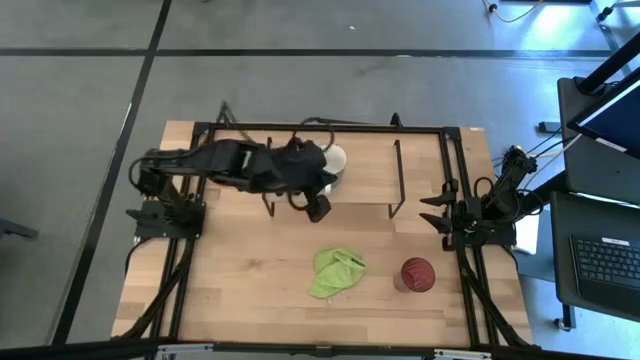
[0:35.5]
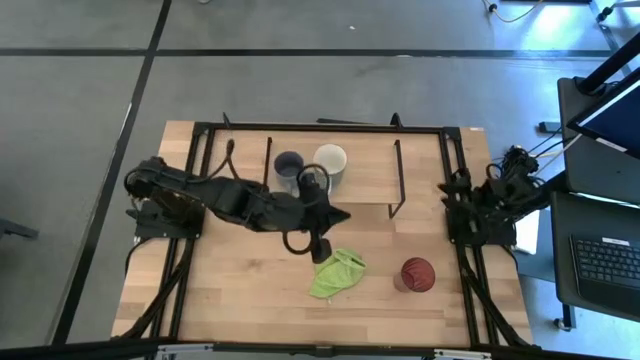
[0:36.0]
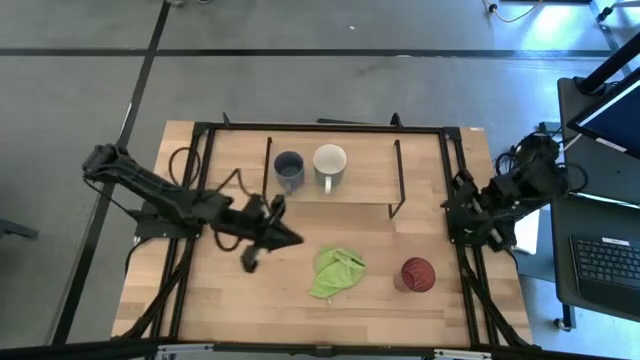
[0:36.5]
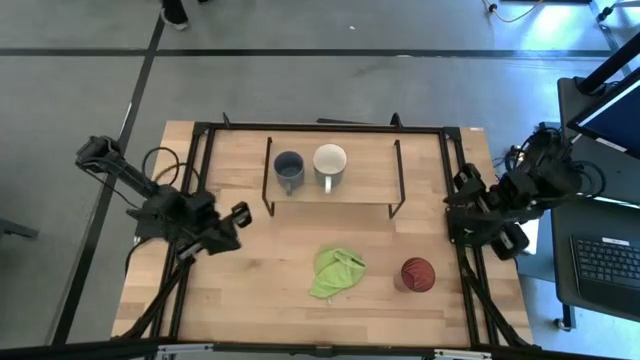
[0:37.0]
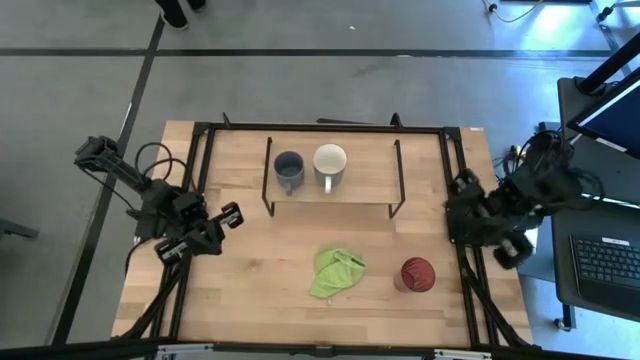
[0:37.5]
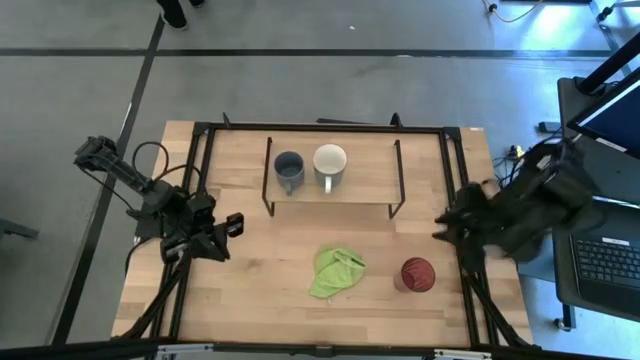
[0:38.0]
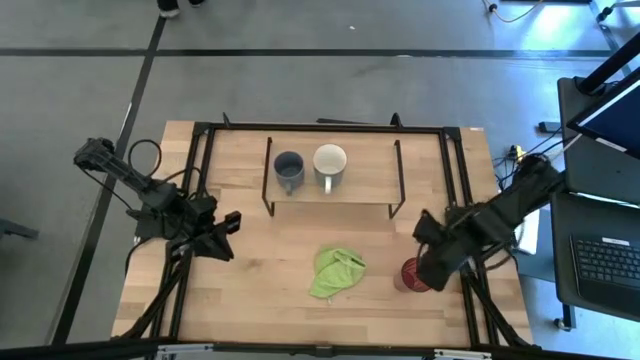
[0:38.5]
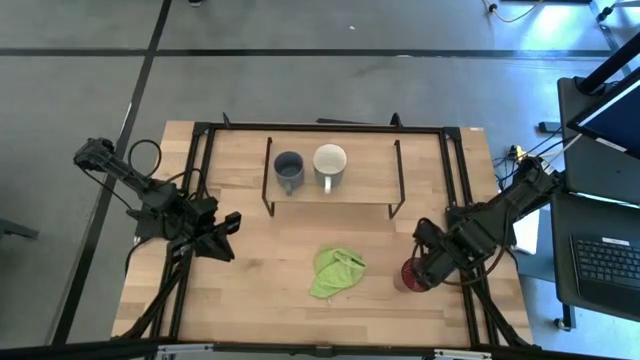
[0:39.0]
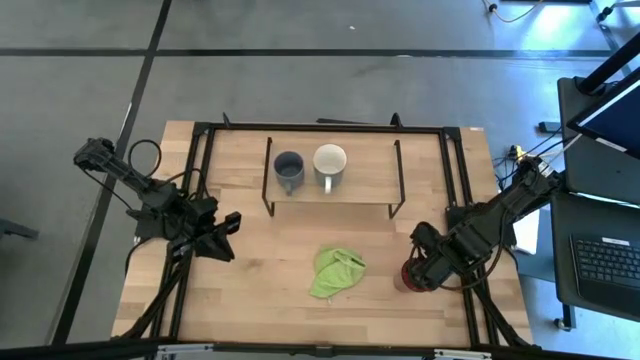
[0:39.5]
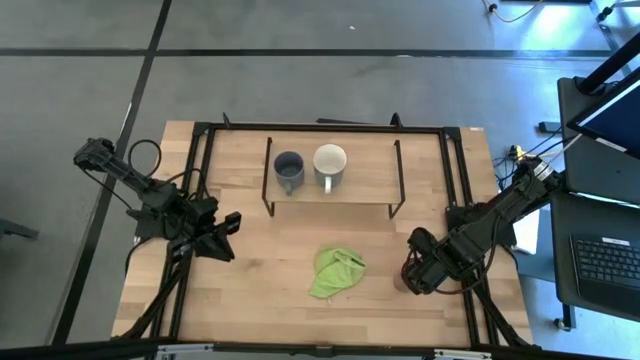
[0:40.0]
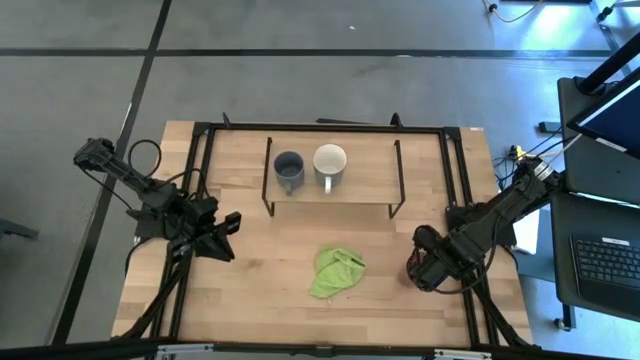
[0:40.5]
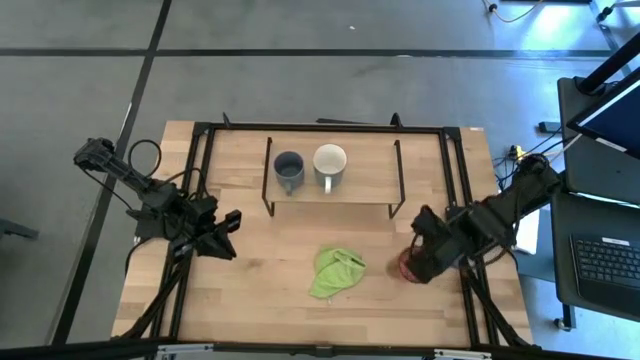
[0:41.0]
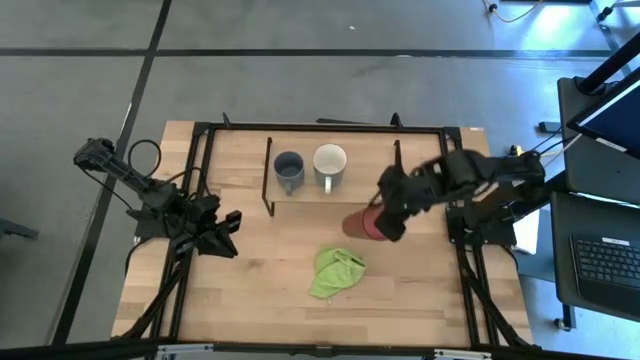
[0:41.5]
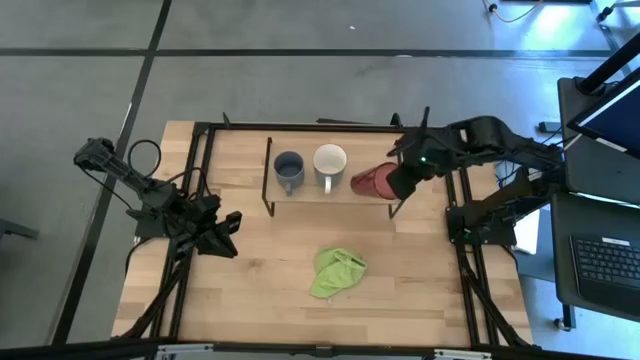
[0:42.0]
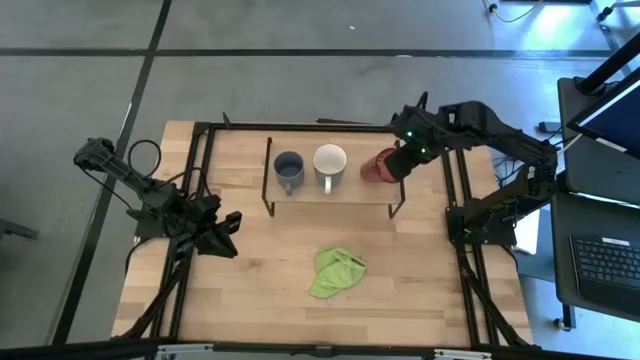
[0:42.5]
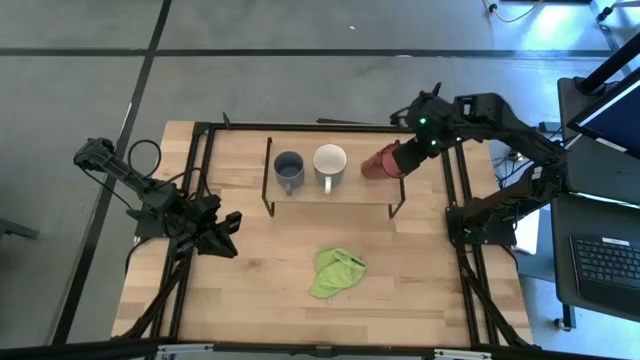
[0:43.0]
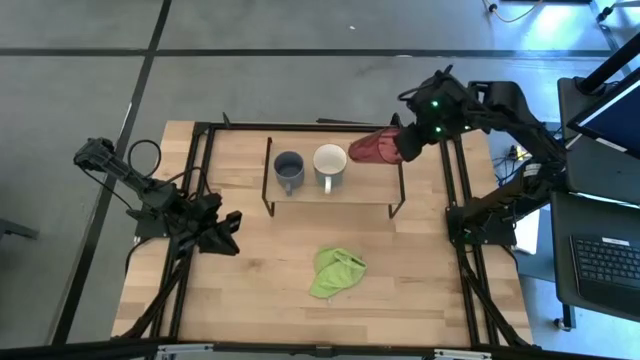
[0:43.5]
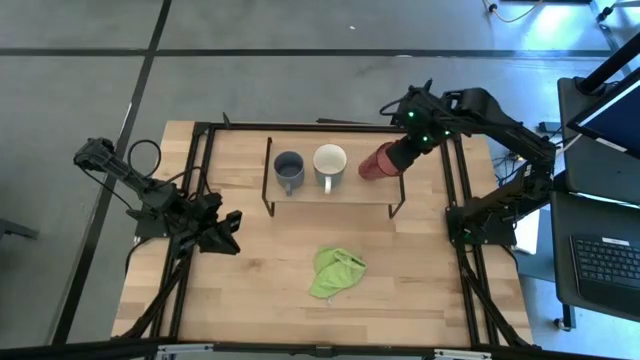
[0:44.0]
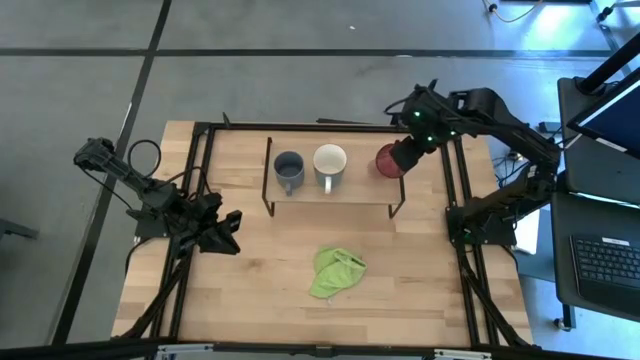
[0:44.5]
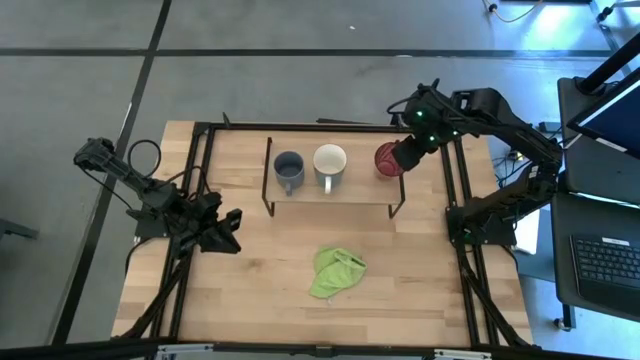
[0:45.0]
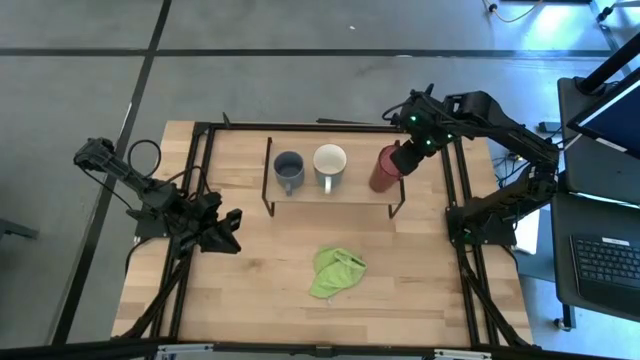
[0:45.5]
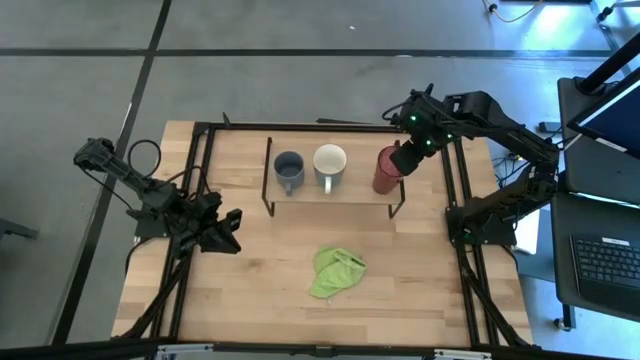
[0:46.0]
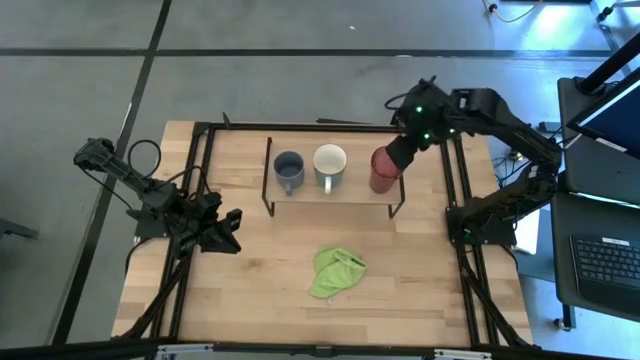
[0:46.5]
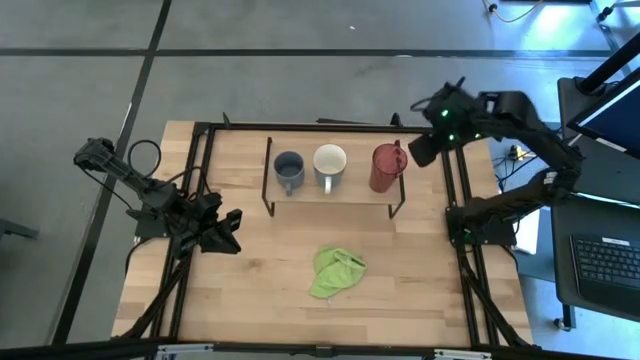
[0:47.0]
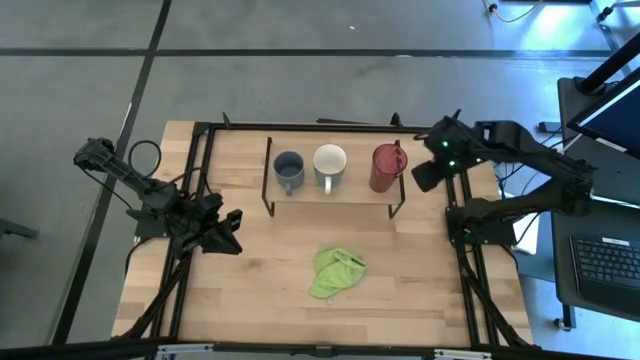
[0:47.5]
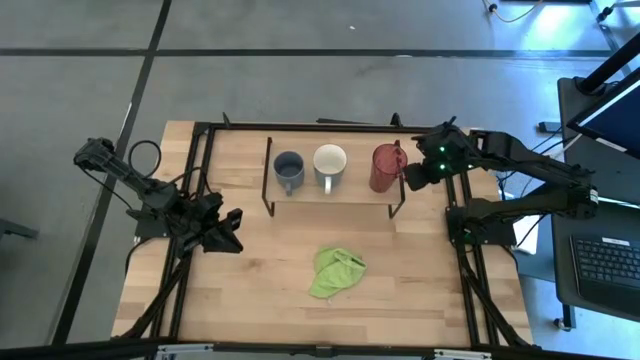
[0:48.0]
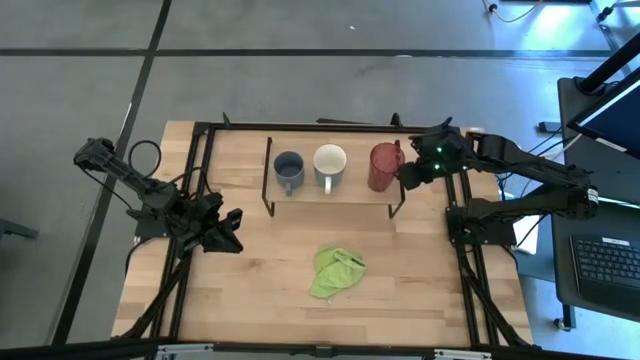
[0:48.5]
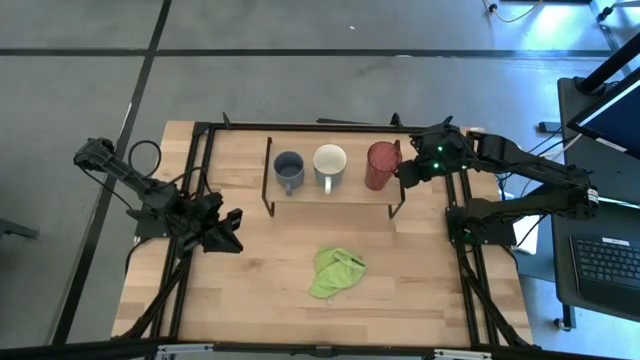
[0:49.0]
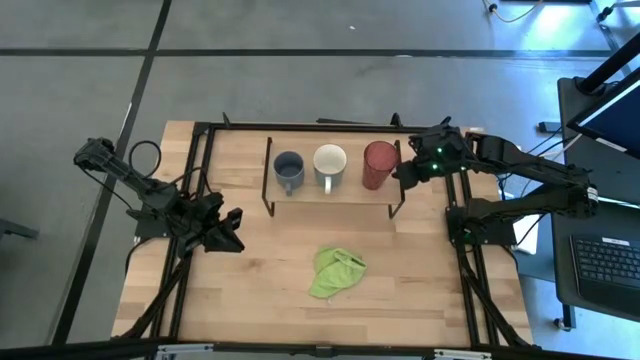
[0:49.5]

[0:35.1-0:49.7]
Task: Stack small to large cups/mugs on shelf
Put the red glass on the shelf

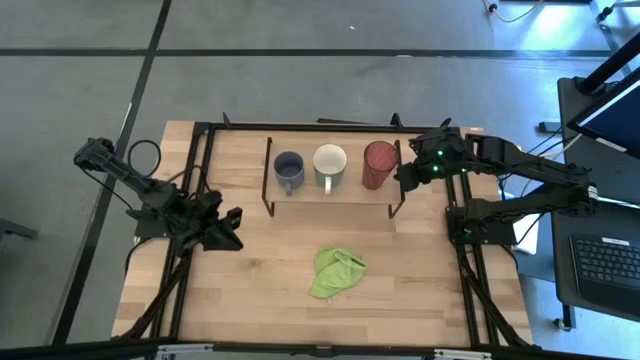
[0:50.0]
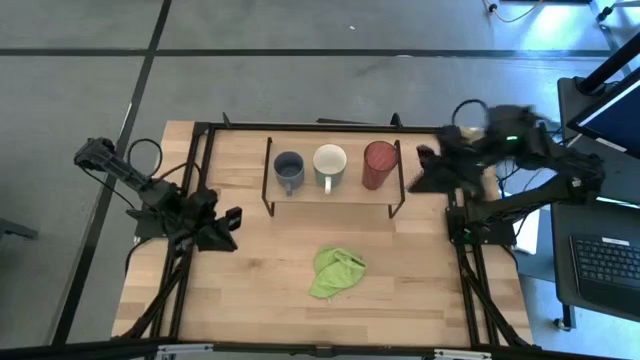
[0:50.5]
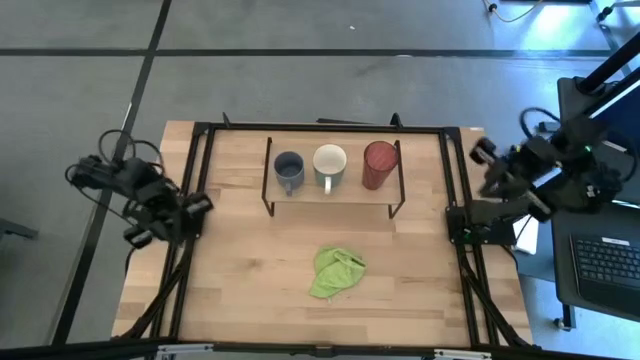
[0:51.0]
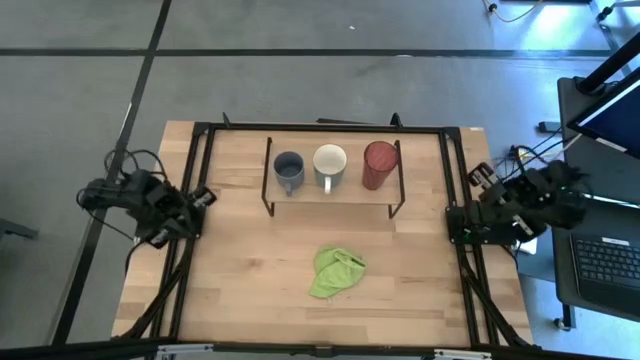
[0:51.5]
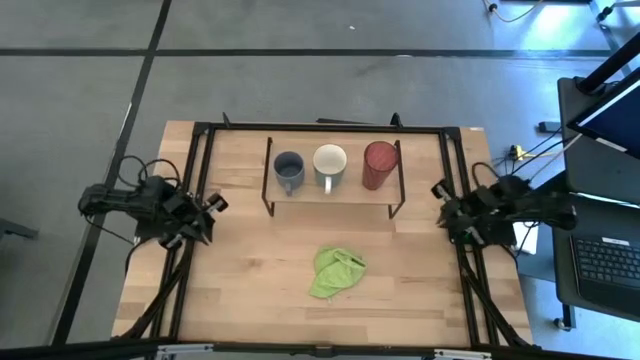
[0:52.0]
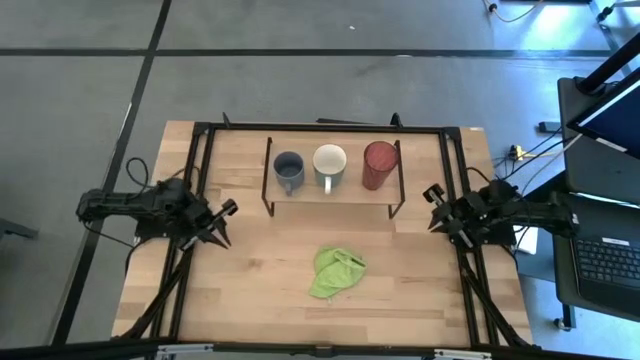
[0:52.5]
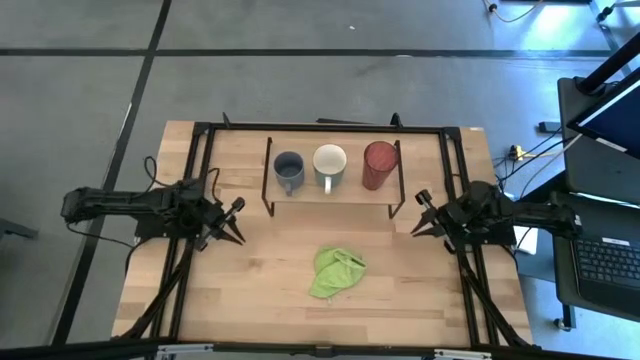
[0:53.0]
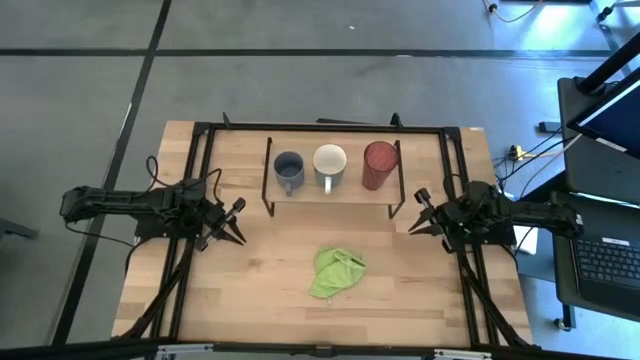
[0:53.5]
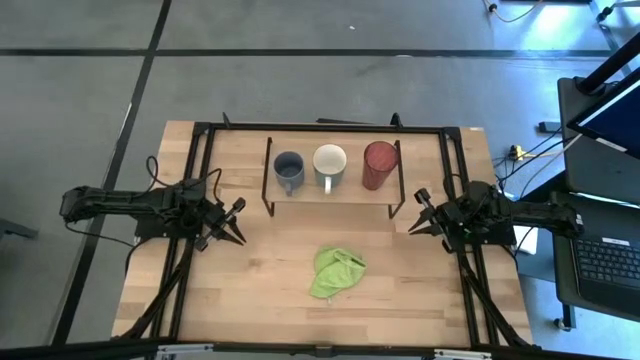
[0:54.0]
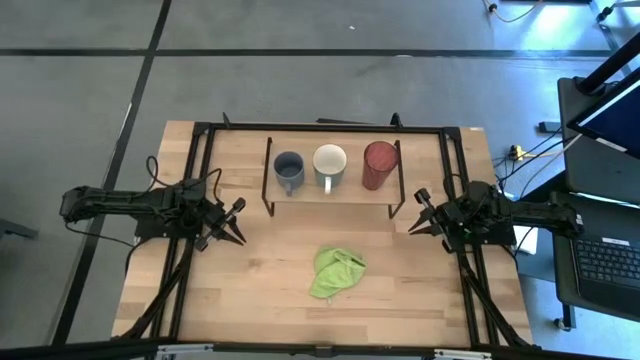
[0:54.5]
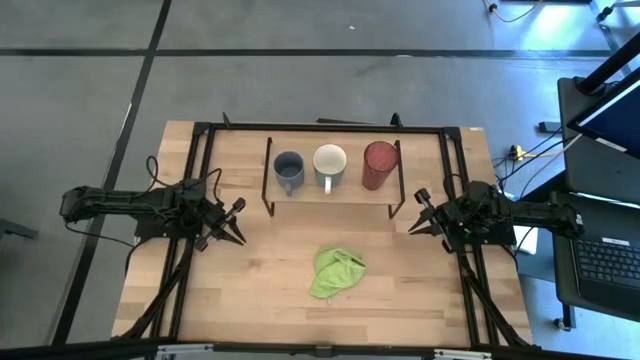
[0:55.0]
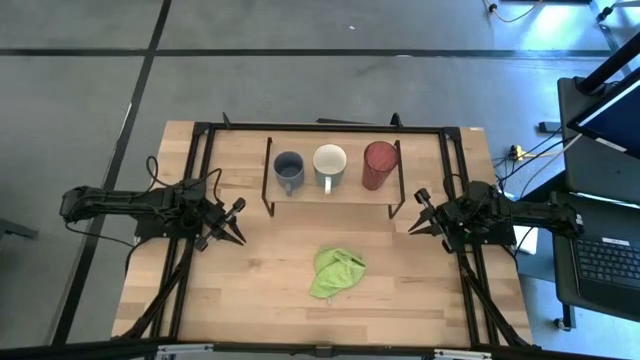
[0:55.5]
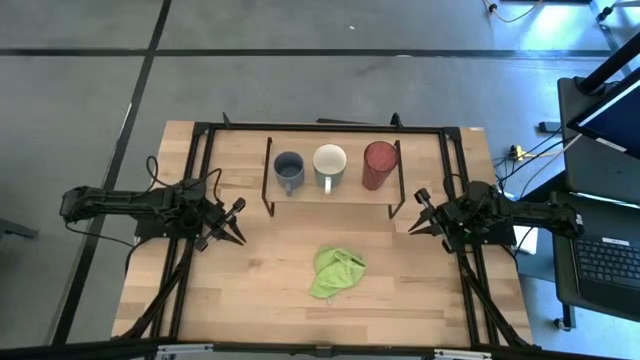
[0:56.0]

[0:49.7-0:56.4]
Return to Home Position
